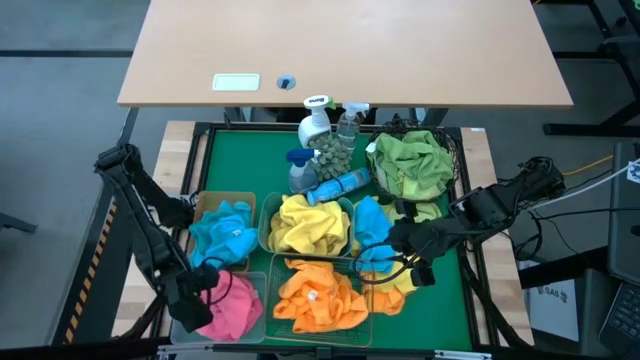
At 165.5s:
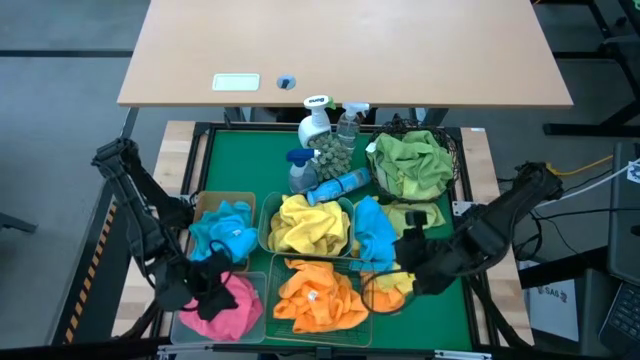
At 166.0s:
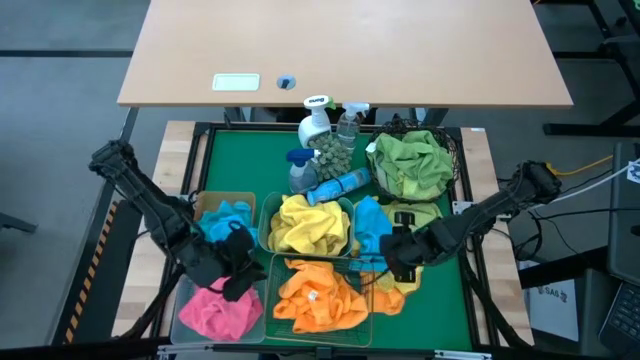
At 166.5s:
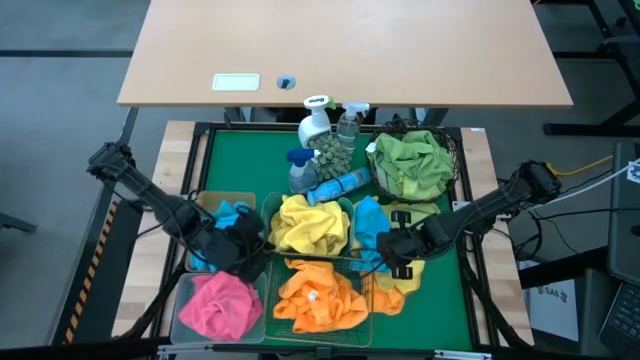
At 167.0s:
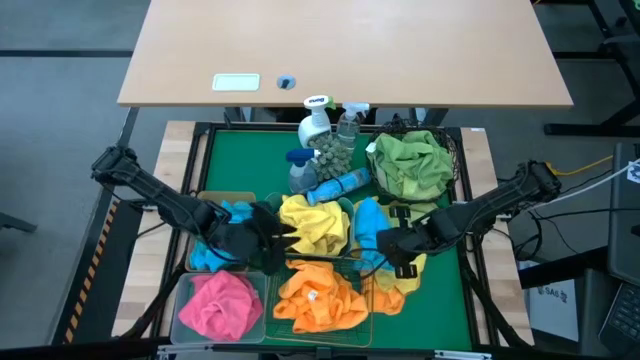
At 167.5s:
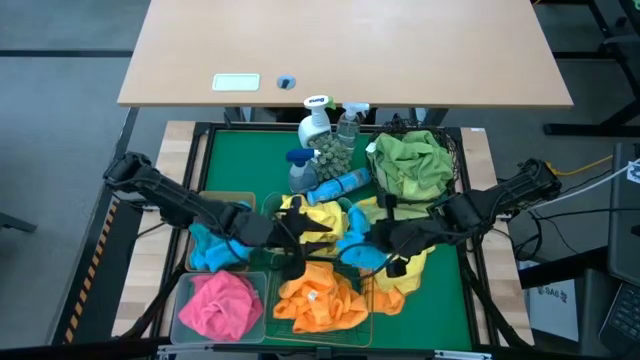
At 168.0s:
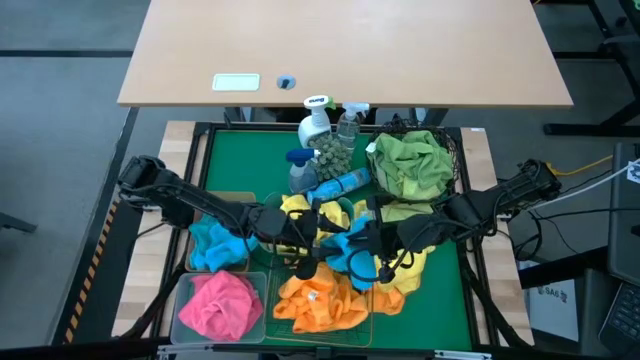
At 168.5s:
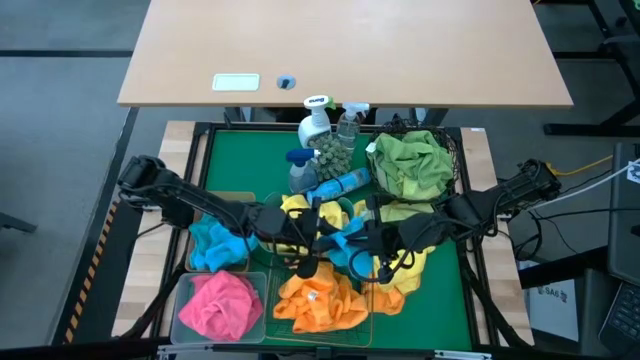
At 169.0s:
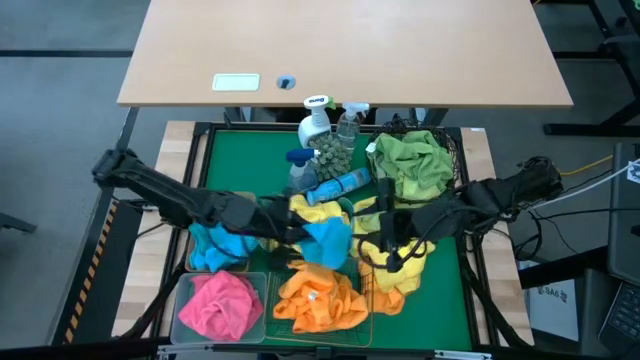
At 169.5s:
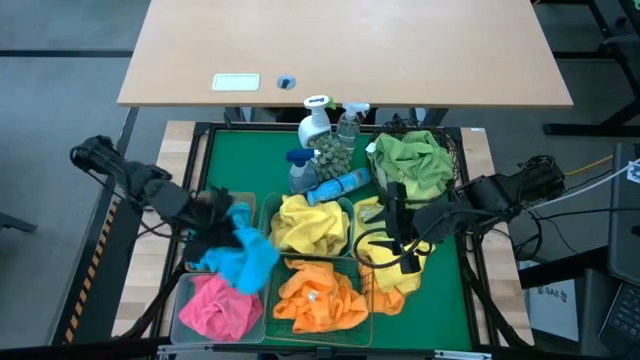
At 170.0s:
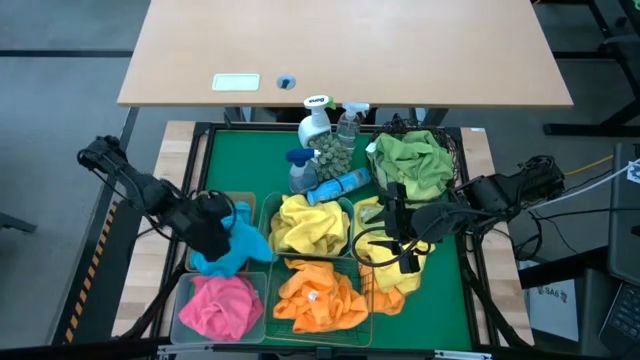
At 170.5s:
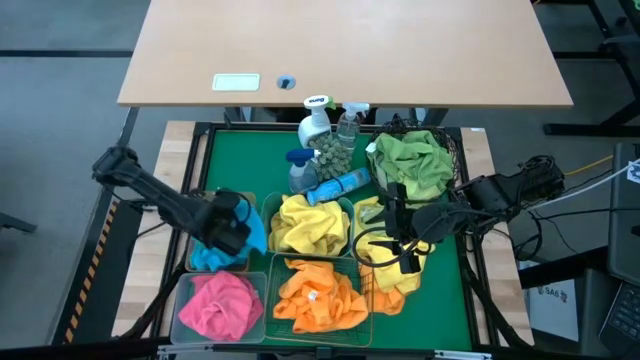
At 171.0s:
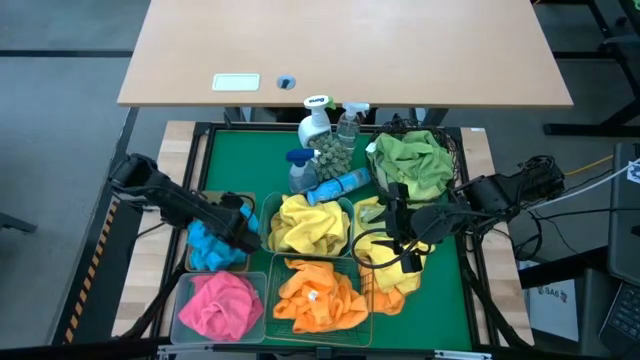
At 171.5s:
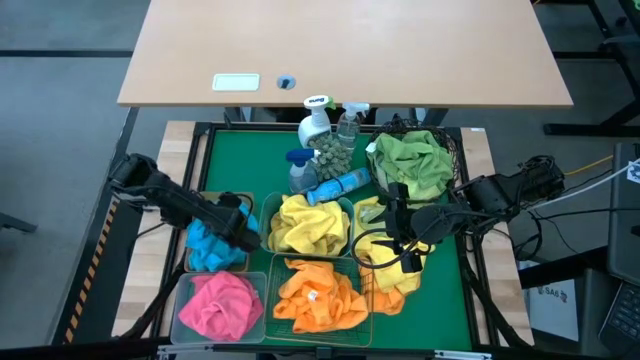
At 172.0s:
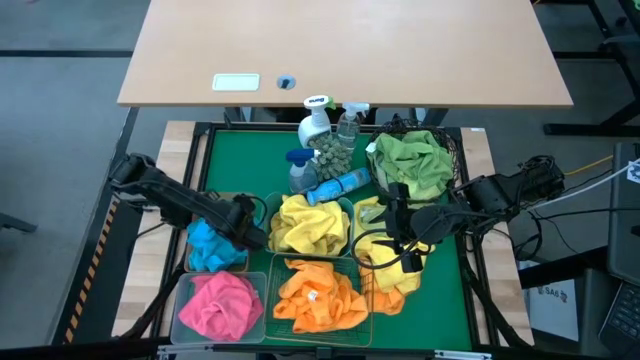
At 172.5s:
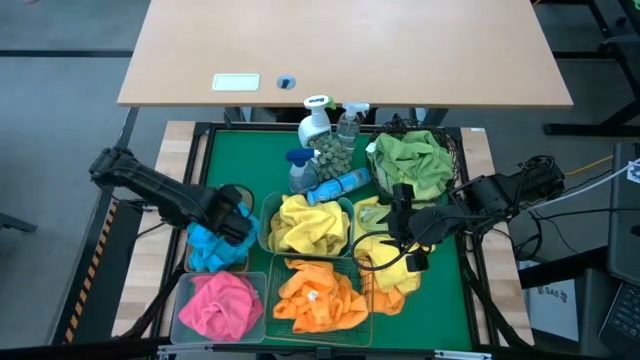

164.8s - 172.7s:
Task: Sort microfiber towel by color & place in baskets
Put the blue microfiber towel into the orange bin

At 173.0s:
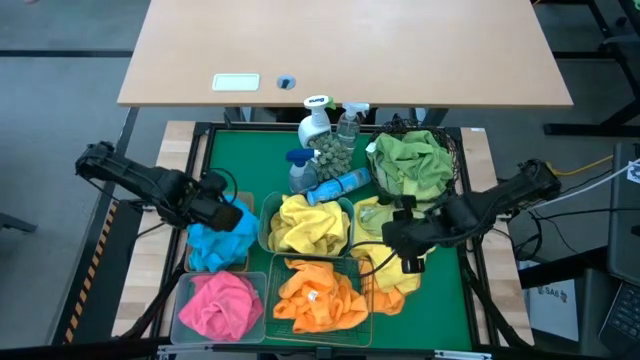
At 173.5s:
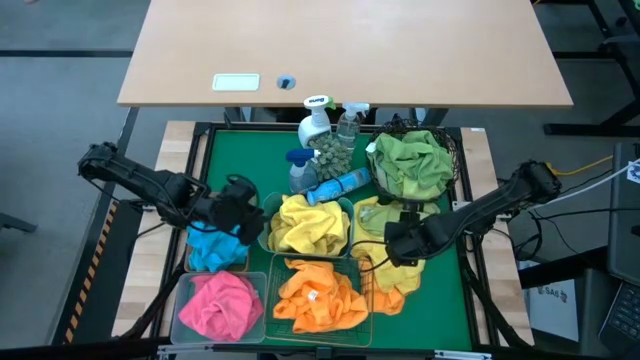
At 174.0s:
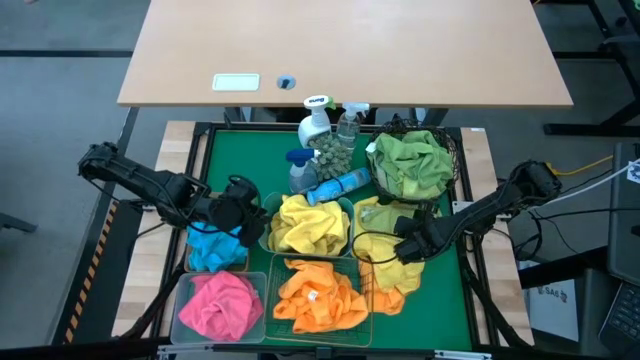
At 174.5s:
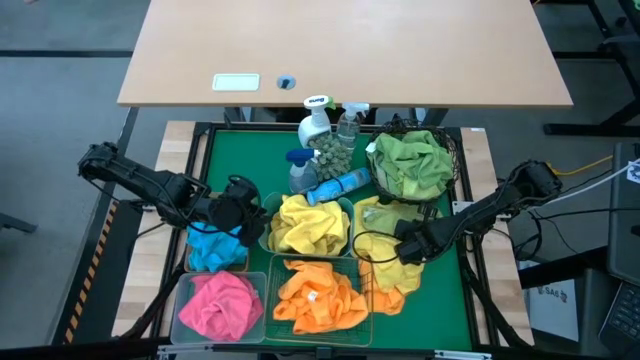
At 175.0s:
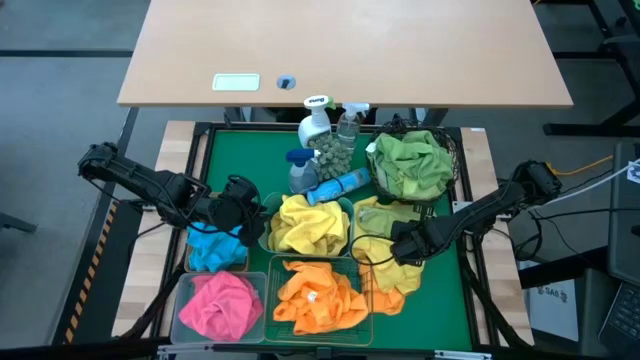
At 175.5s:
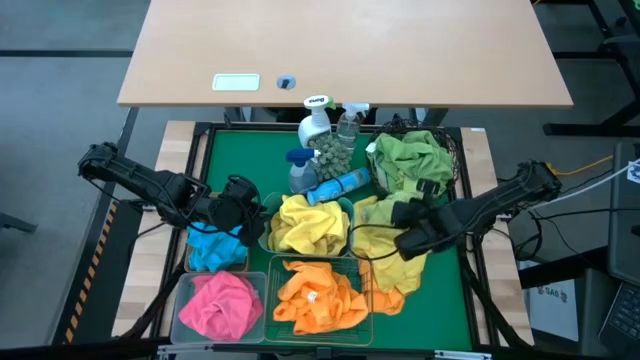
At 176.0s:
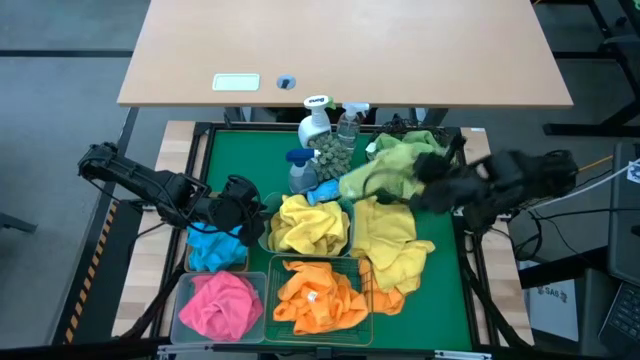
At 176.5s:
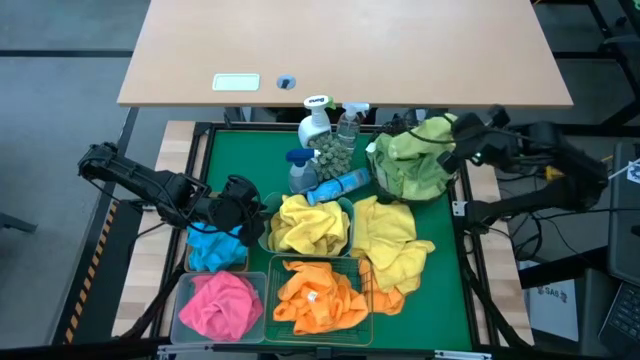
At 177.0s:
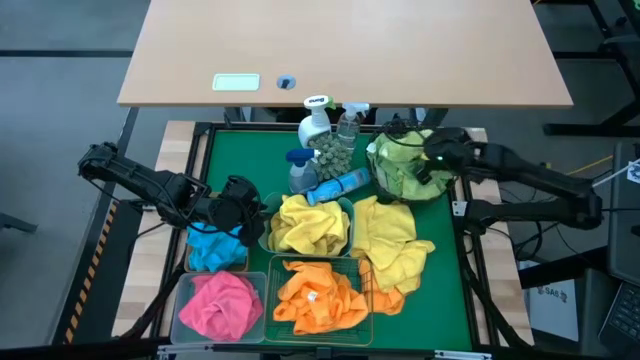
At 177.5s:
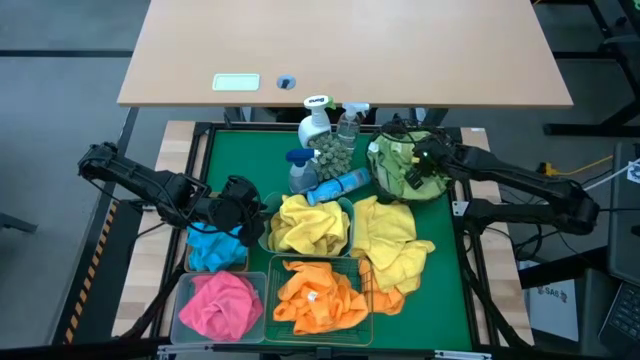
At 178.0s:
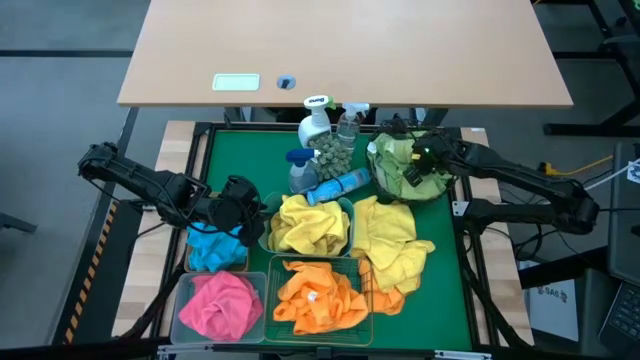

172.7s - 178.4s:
Put the green microfiber towel into the black wire basket

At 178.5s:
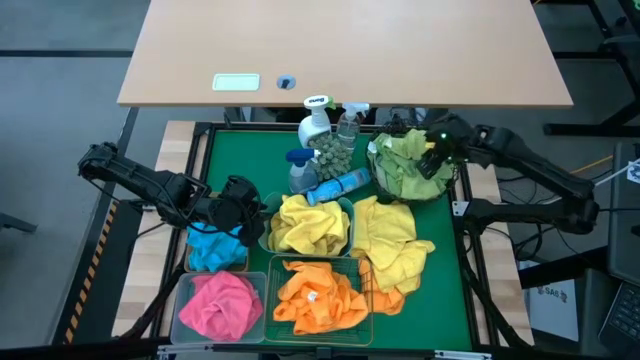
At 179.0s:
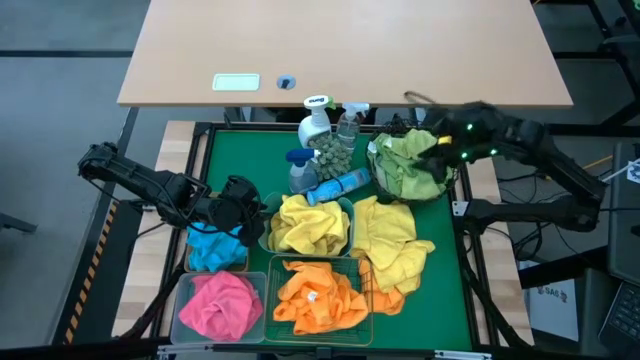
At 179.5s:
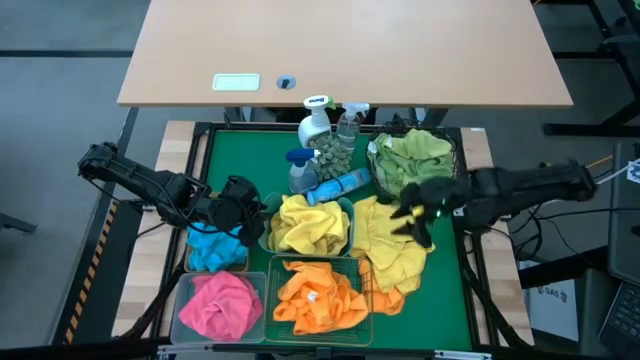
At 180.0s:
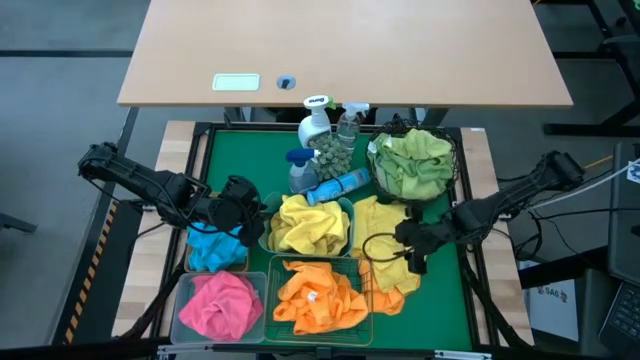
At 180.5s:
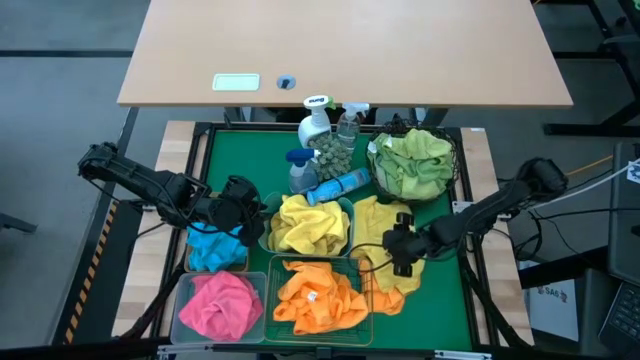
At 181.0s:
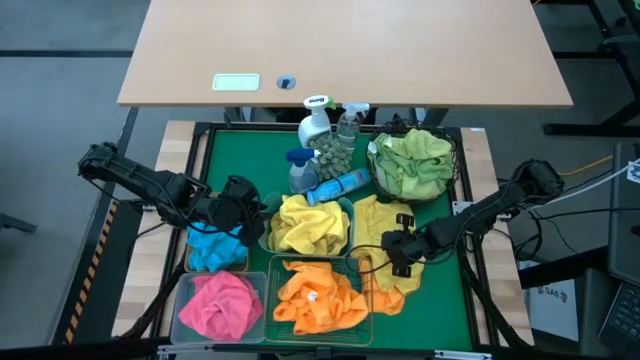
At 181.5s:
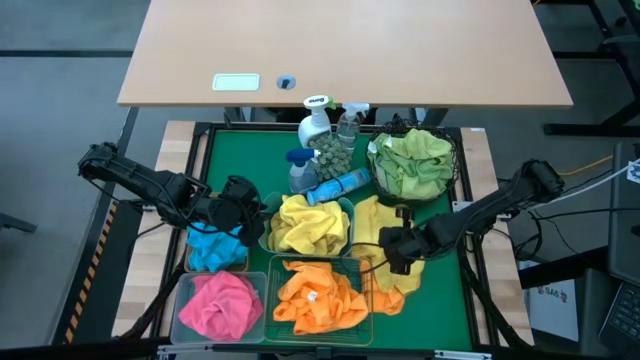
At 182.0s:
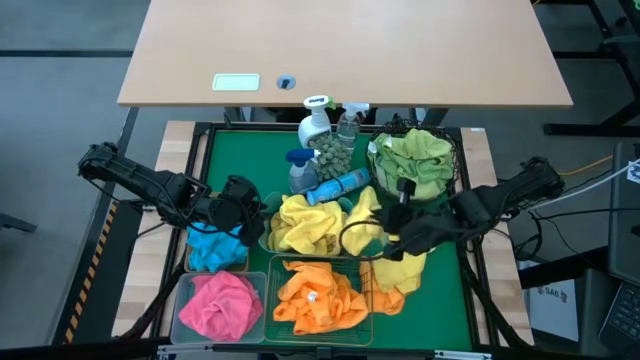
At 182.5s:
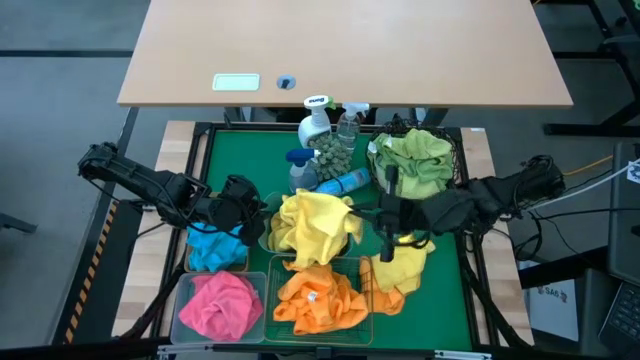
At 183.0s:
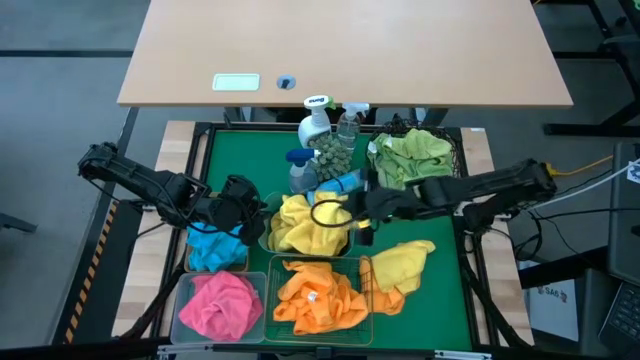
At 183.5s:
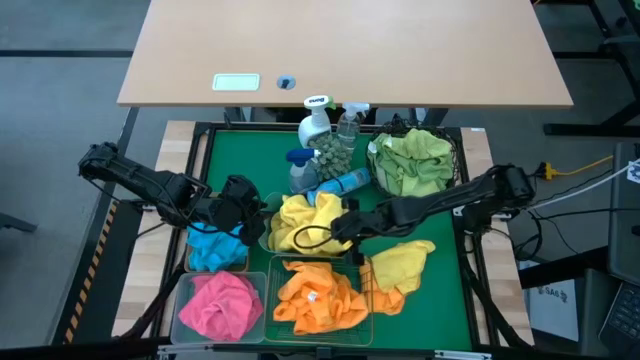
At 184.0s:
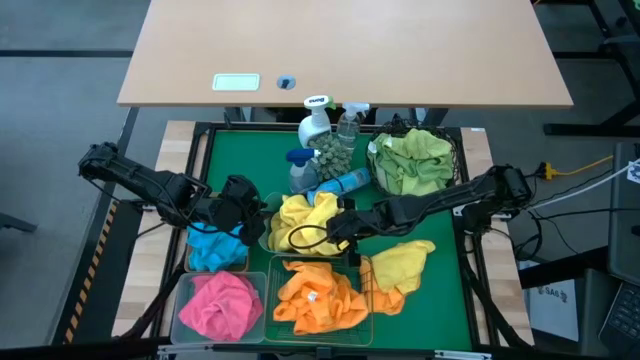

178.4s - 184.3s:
Put the yellow microfiber towel into the blue bin

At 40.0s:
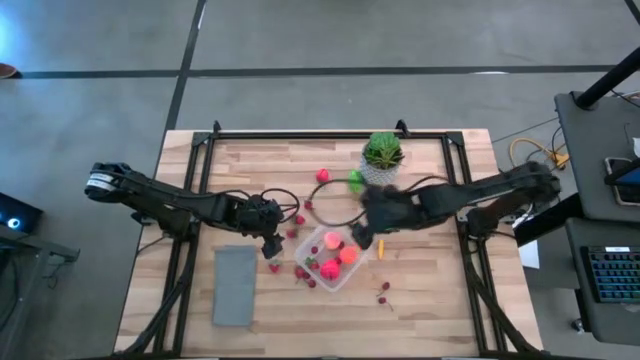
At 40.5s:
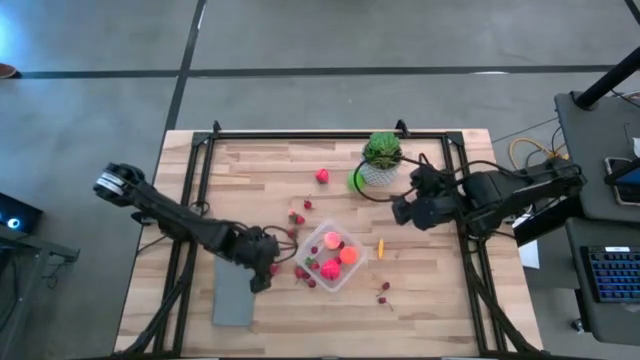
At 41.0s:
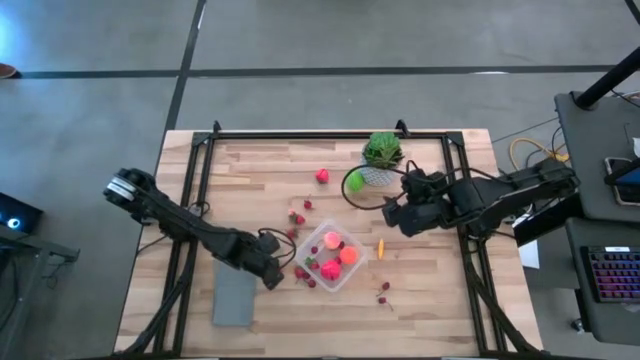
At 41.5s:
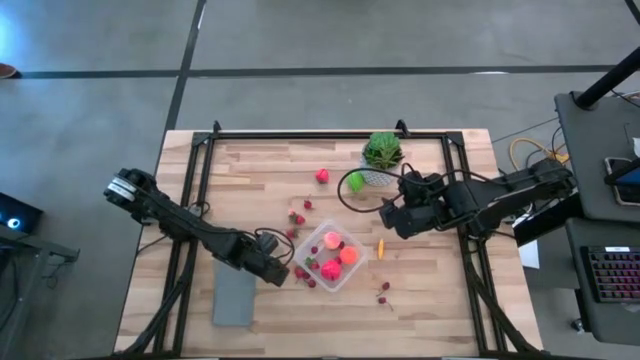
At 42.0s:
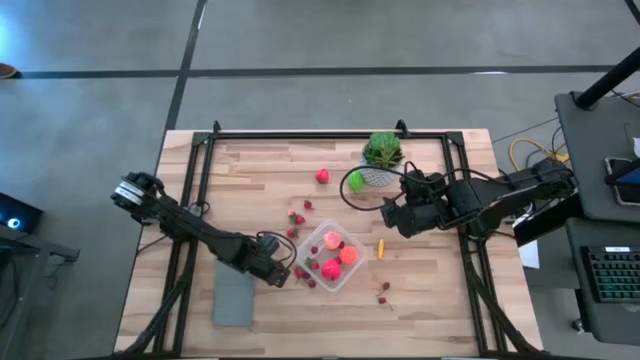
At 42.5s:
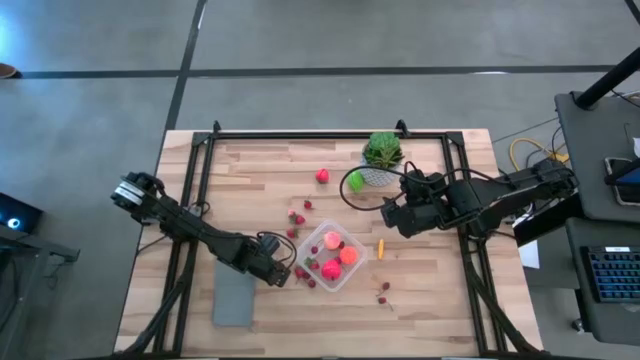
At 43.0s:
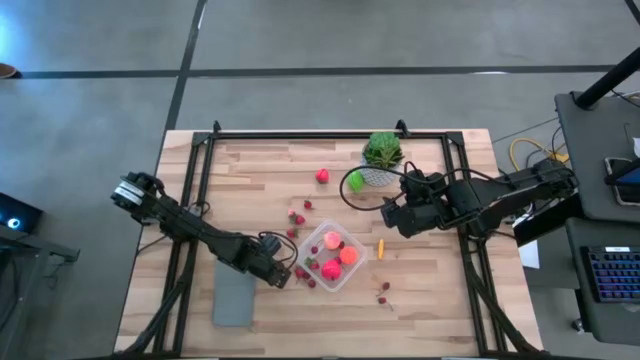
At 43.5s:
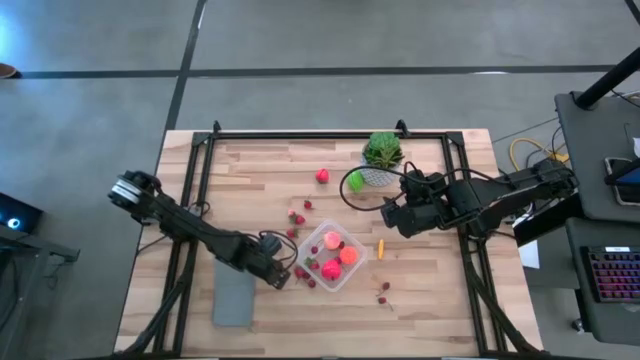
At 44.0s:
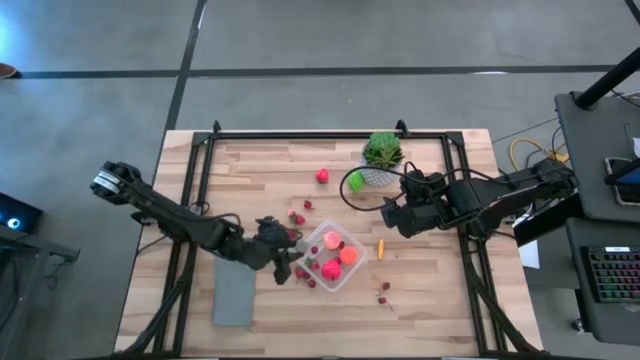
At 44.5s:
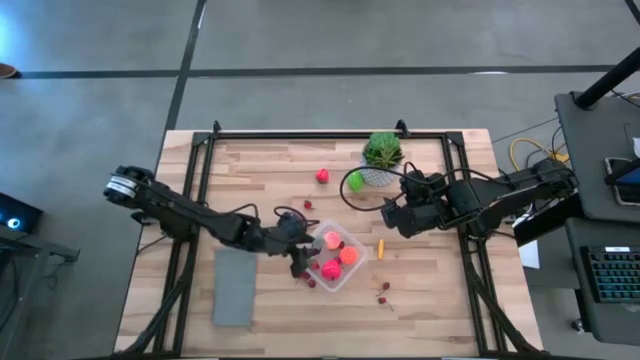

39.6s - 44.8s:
Task: Pick and placing Produce into tupperware
Put the red strawberry into the transparent bin
